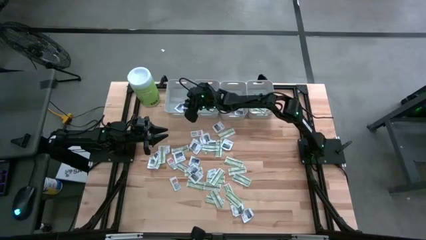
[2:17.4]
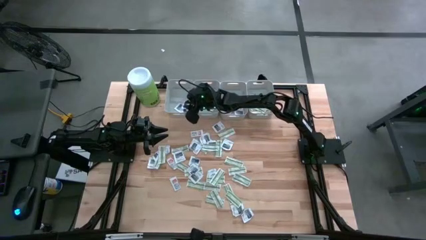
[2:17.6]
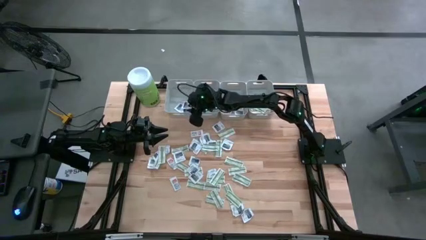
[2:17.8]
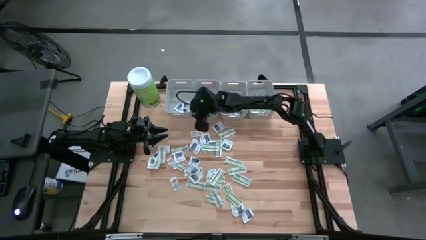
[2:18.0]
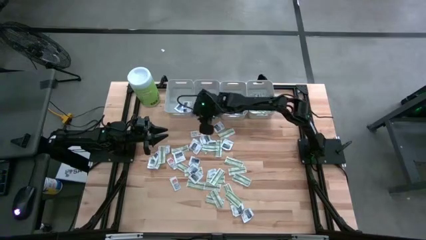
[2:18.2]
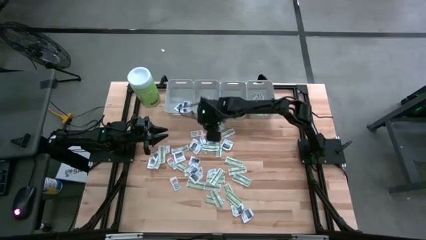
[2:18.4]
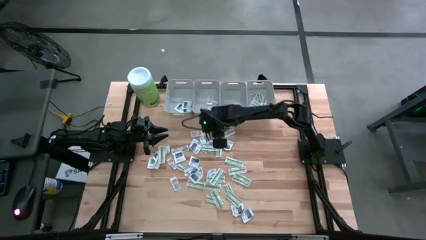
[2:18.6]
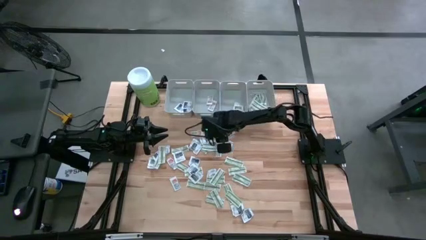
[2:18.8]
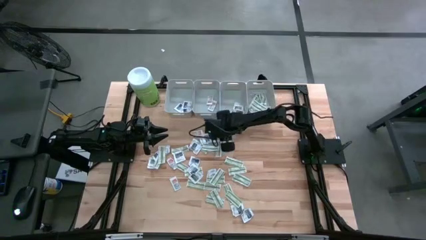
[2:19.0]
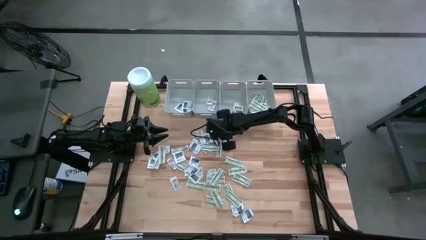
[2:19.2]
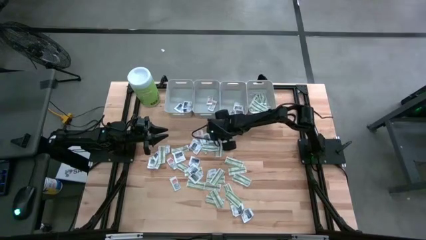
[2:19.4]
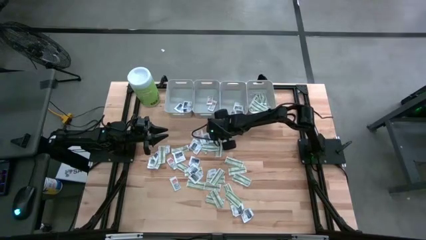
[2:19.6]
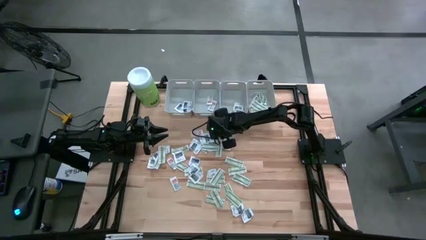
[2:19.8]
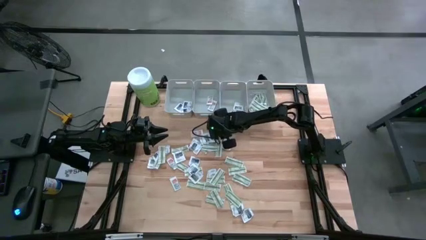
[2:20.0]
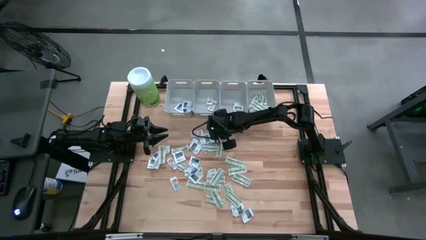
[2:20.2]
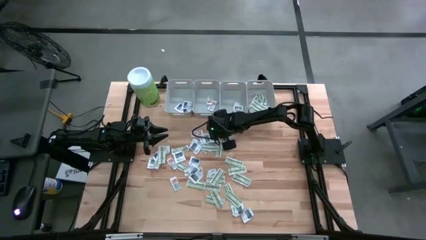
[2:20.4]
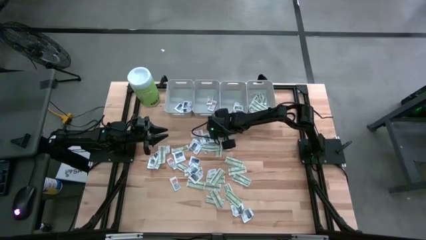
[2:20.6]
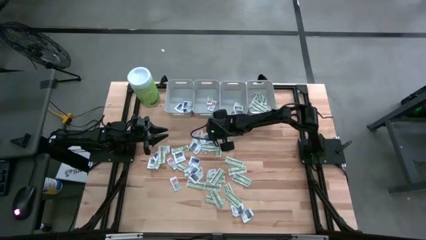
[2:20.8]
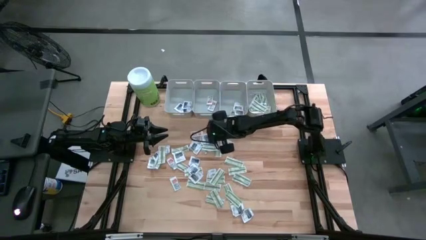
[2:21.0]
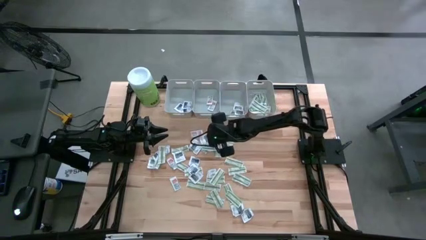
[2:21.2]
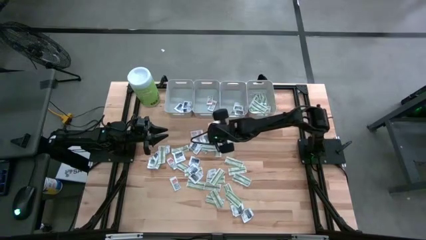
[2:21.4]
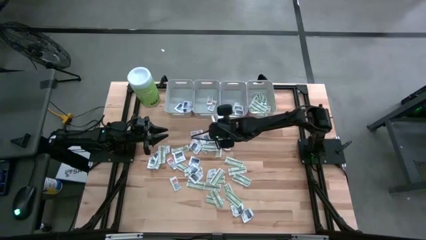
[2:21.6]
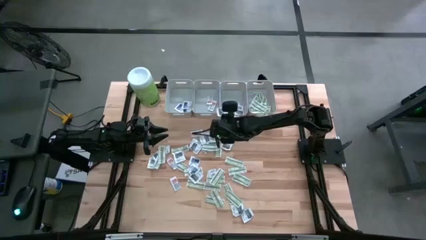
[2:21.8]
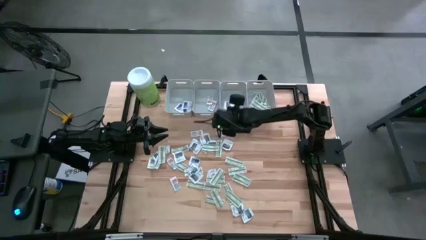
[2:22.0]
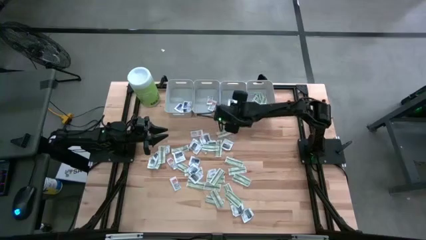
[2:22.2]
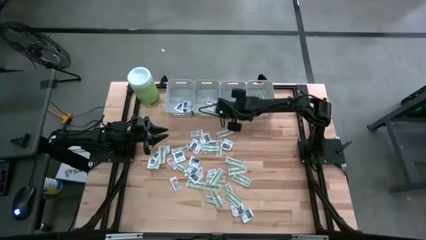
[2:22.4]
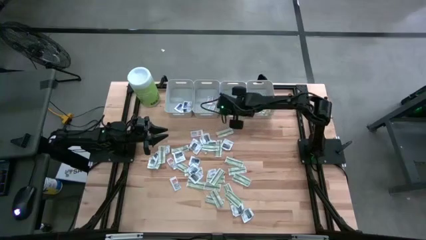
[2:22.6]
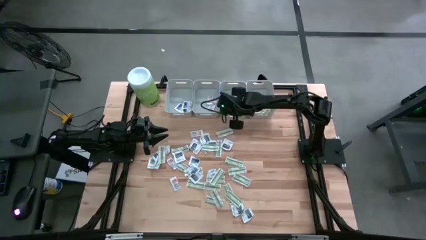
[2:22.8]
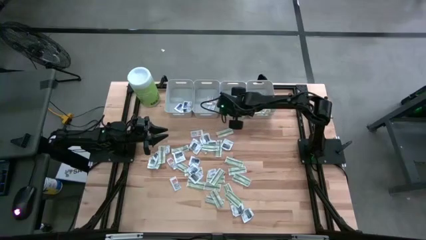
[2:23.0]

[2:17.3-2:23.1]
Task: Pick & Place First Aid Supplies
Put the towelette pack into the middle right gray bin

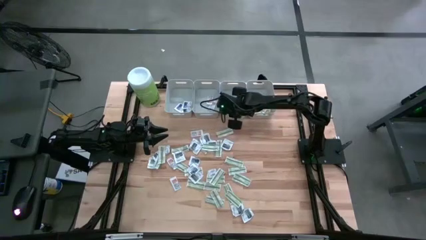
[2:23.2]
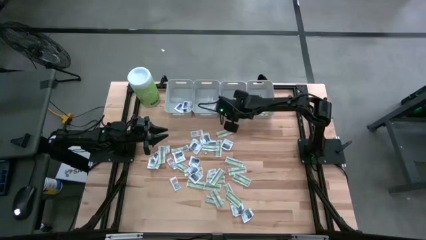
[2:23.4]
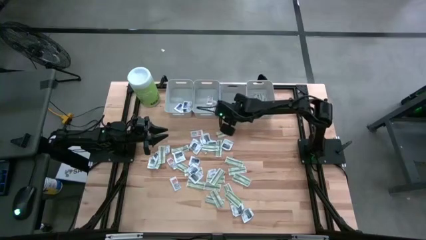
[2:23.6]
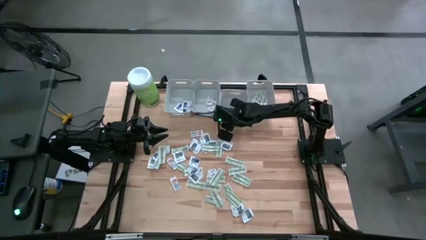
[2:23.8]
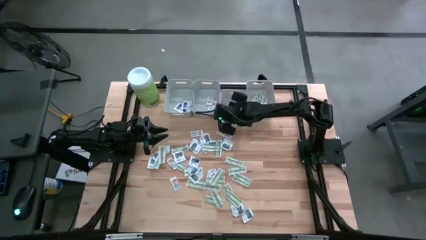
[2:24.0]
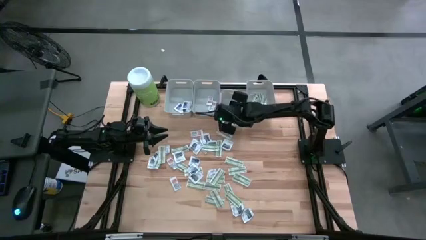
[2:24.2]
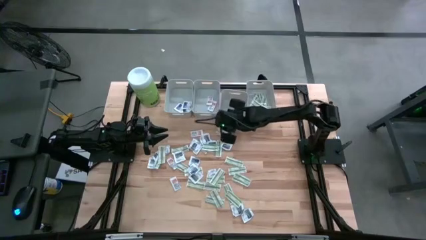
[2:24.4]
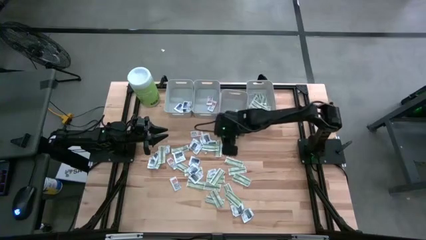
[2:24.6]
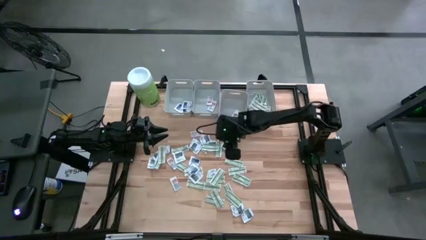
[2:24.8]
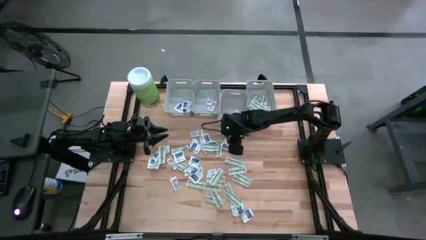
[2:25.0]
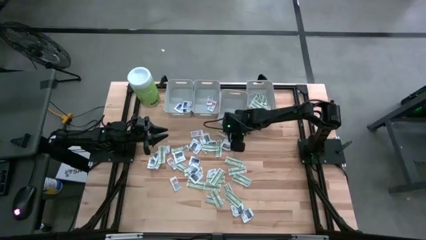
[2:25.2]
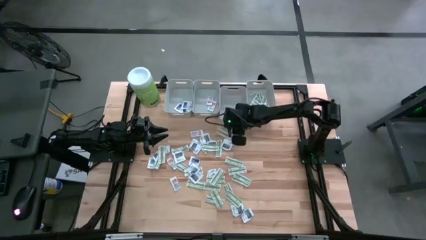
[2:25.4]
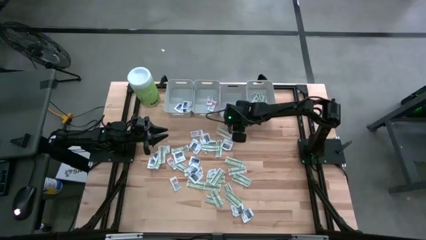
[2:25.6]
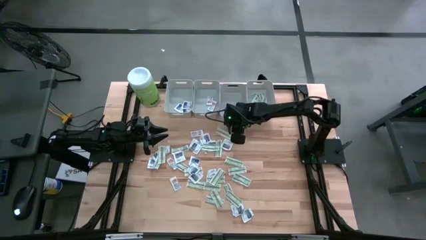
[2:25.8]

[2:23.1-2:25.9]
Adjust the middle right gray bin

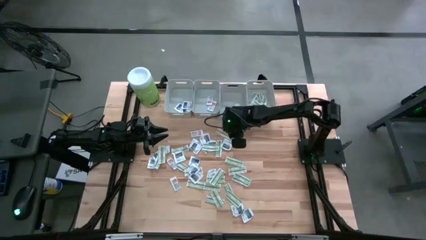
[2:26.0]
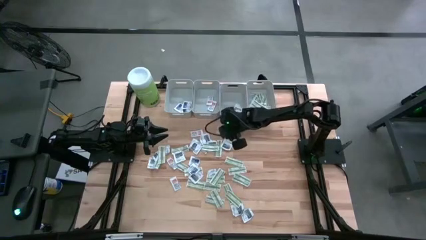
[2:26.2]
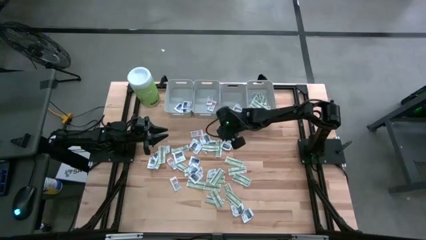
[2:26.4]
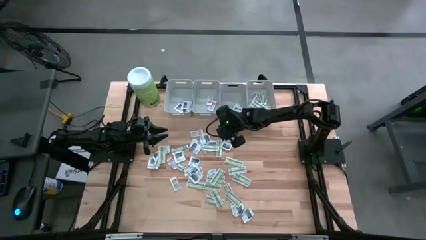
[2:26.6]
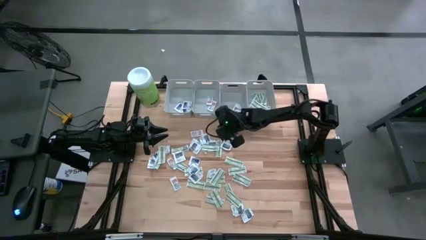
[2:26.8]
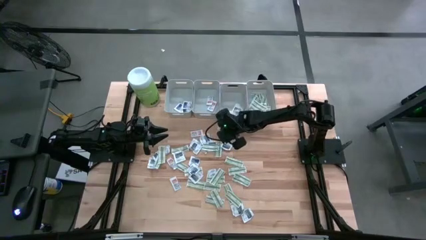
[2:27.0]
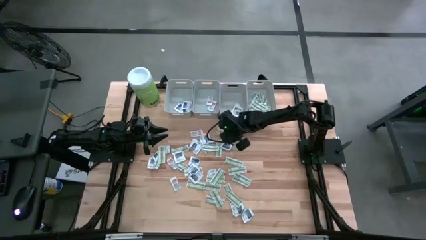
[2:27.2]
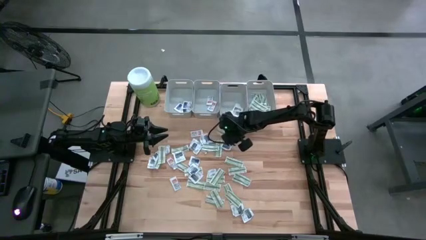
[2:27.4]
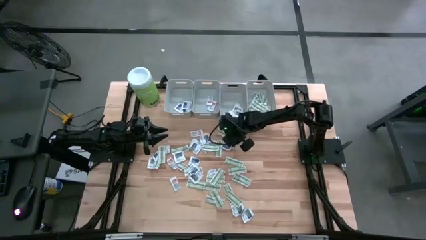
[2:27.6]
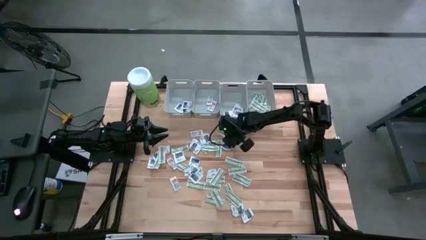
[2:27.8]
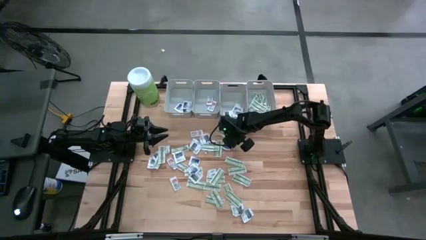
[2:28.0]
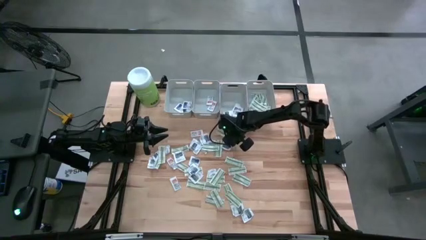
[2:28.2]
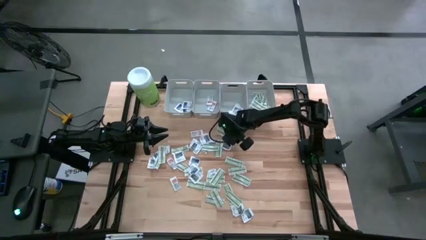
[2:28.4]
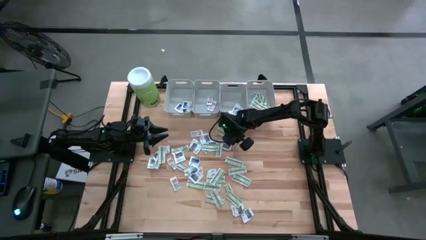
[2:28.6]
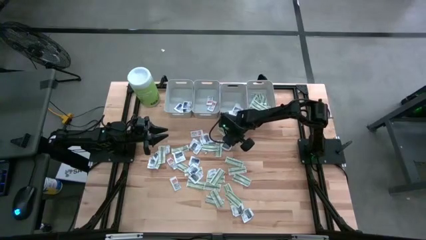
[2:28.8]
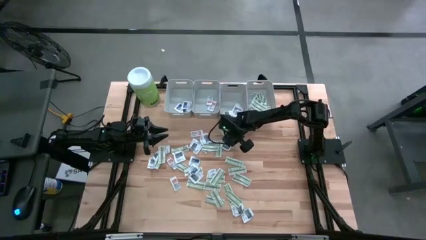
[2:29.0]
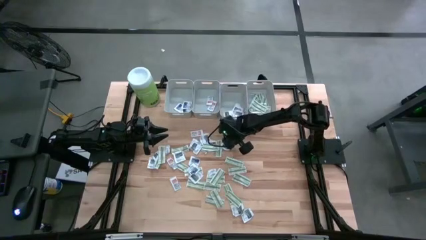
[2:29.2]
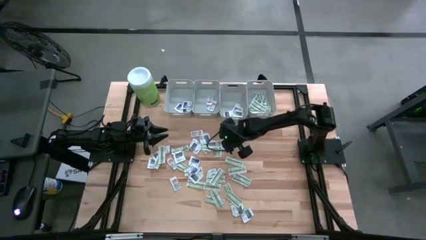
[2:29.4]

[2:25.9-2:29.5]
Put the bandage into the right gray bin

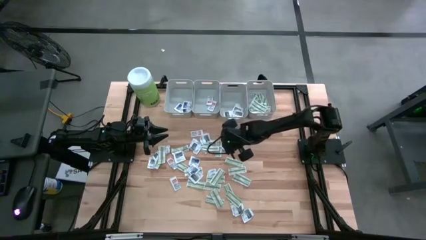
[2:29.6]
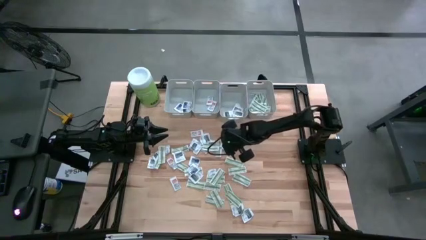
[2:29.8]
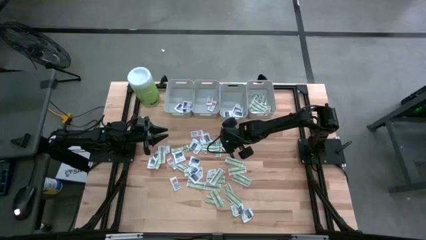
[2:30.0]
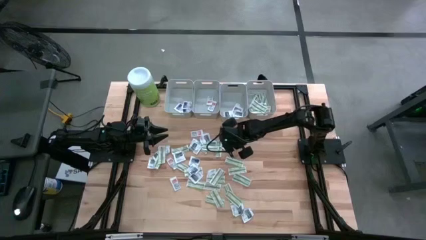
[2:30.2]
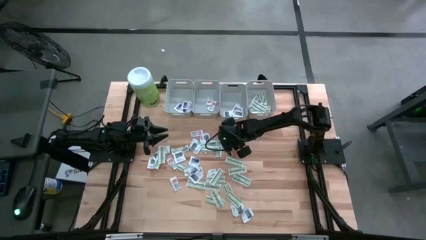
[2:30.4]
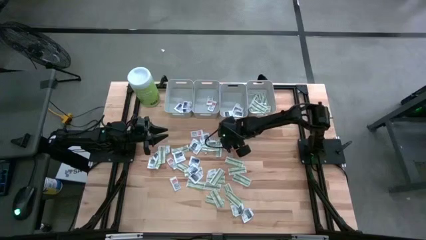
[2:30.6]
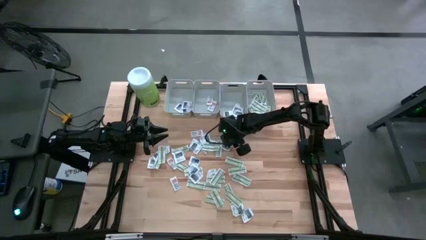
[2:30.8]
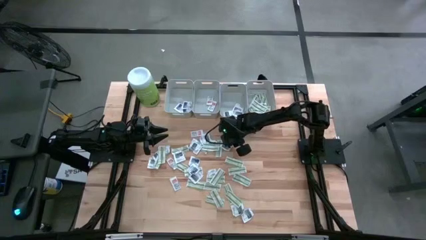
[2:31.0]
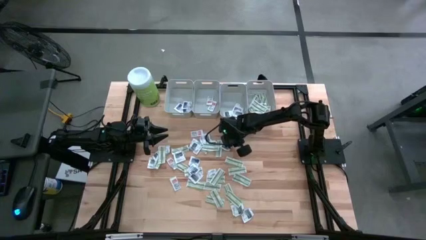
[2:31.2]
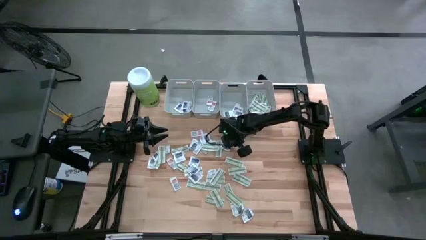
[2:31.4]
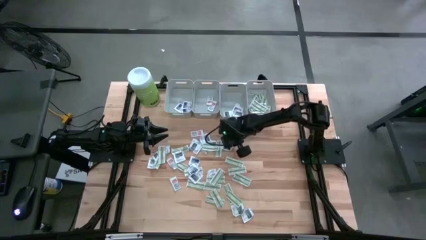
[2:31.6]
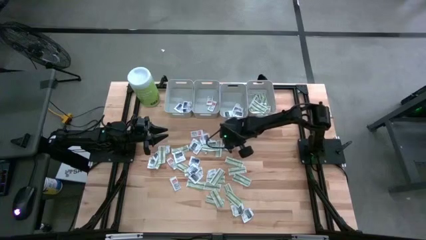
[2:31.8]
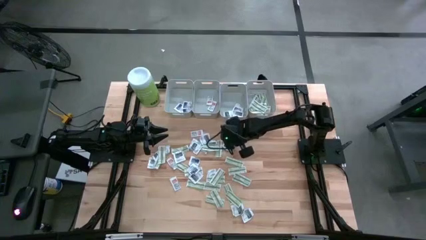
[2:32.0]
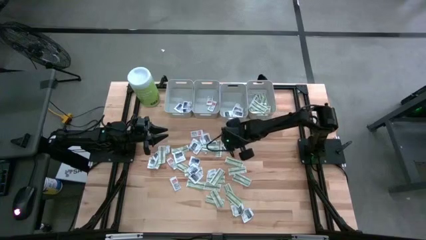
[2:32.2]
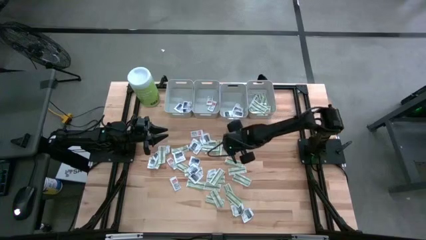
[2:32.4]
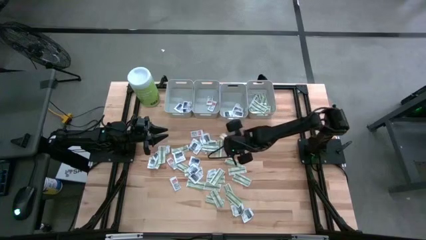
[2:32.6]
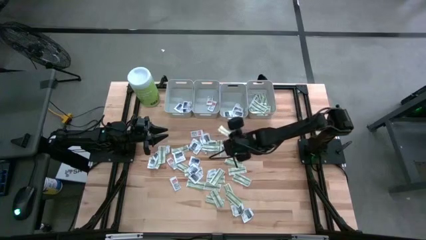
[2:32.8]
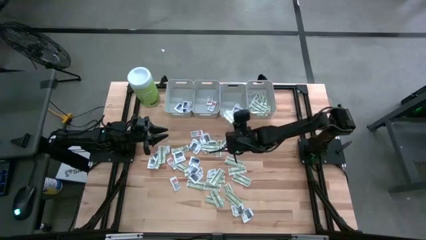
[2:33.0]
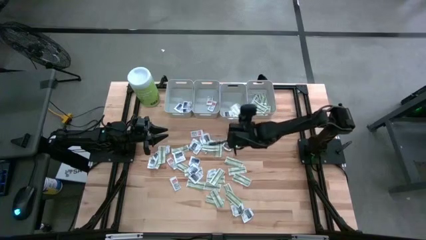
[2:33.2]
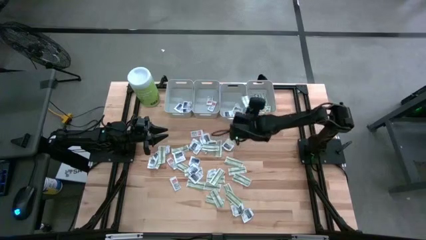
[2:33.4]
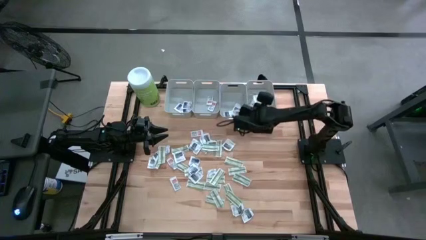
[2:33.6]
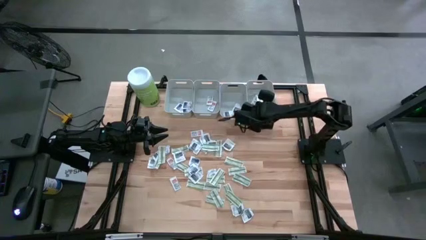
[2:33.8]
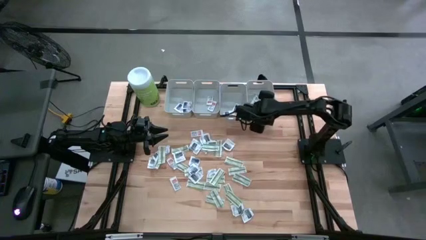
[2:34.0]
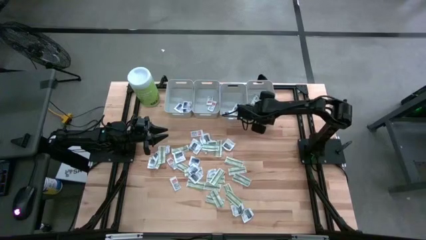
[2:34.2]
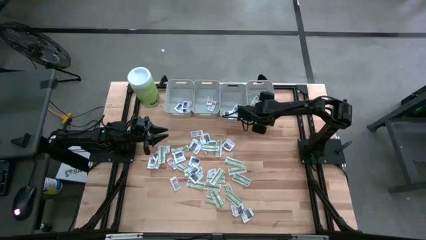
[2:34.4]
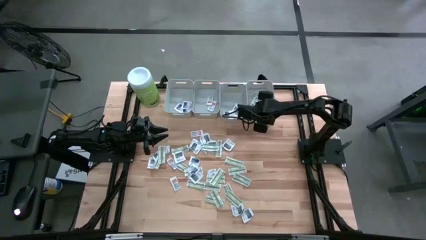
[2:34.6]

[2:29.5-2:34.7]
Put the bandage into the right gray bin

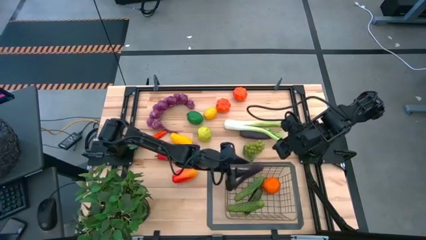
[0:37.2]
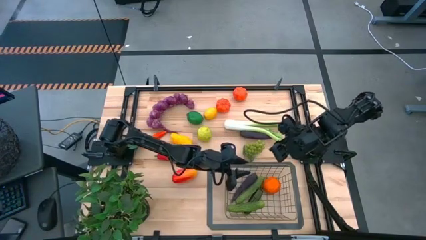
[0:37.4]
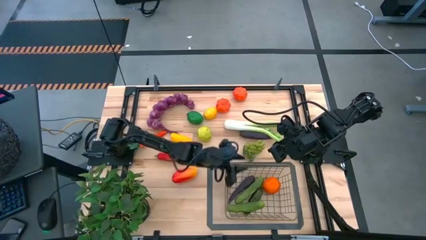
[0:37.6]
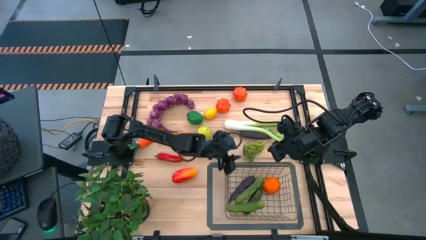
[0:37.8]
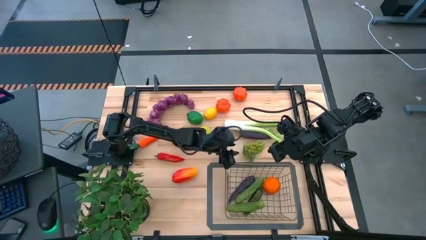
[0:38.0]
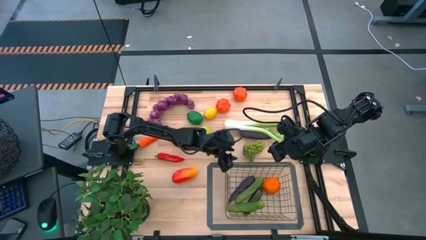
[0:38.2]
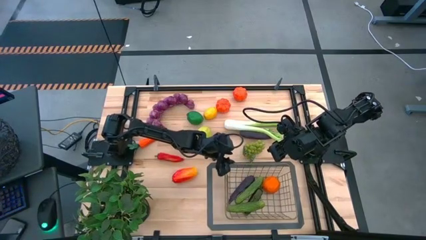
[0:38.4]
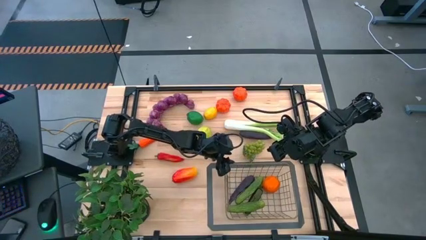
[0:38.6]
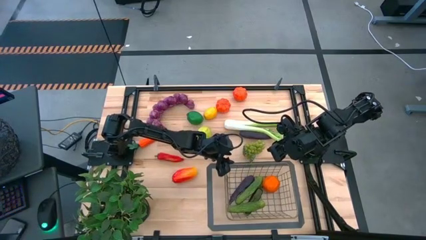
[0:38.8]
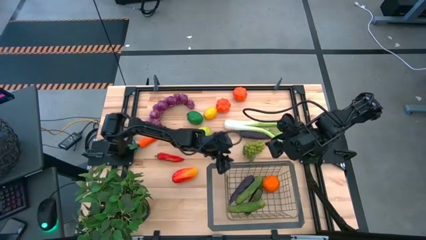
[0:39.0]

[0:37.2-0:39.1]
Task: Build produce basket
Adjust the wire basket
